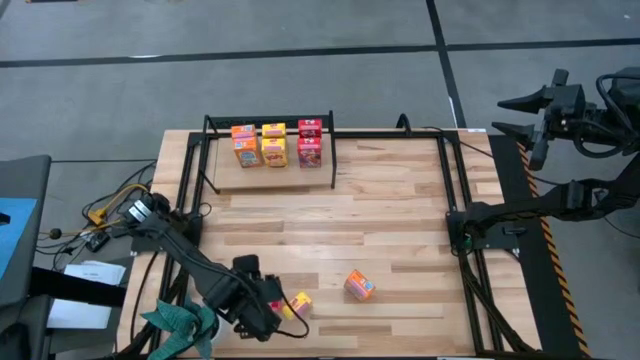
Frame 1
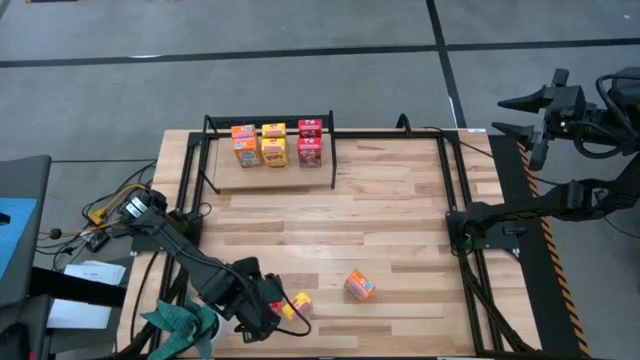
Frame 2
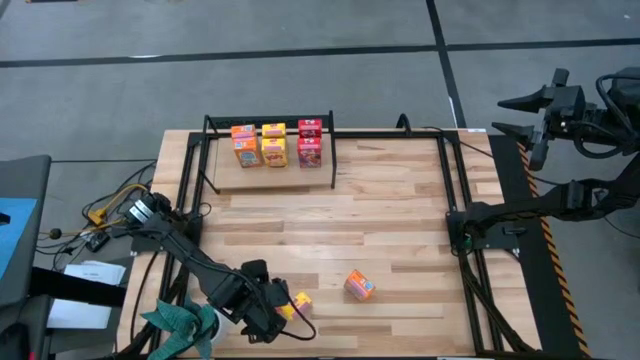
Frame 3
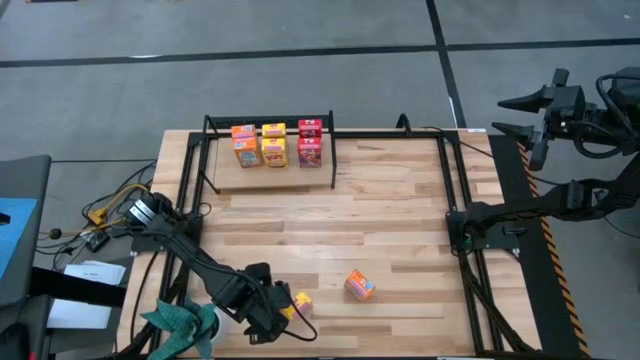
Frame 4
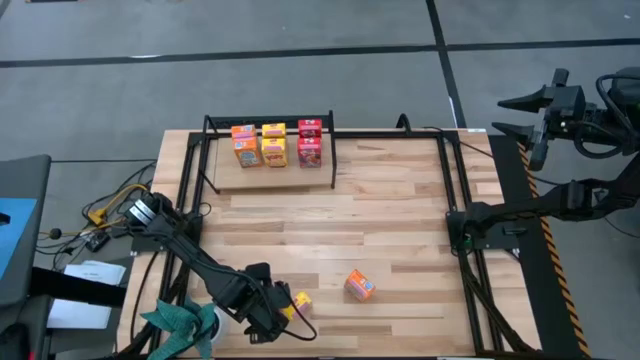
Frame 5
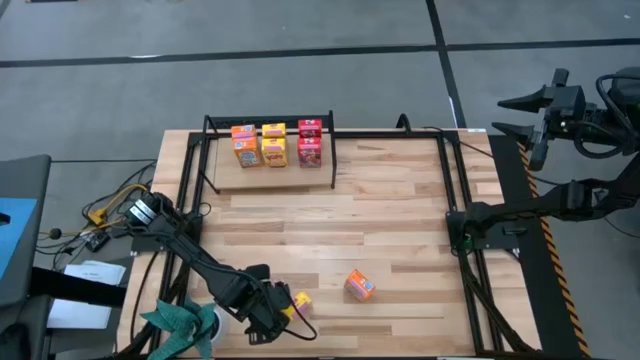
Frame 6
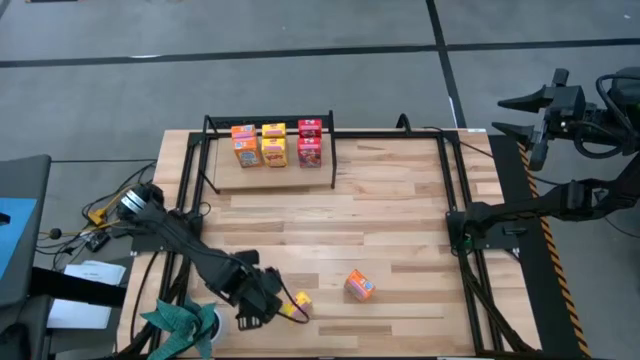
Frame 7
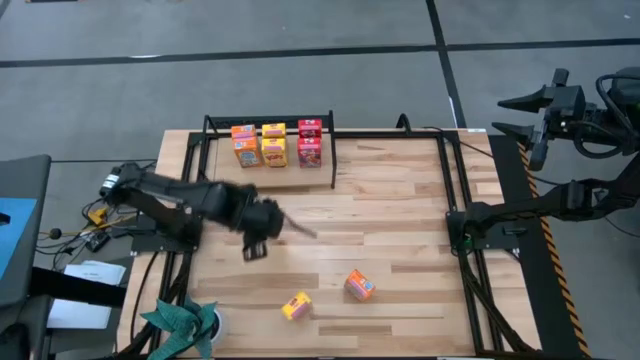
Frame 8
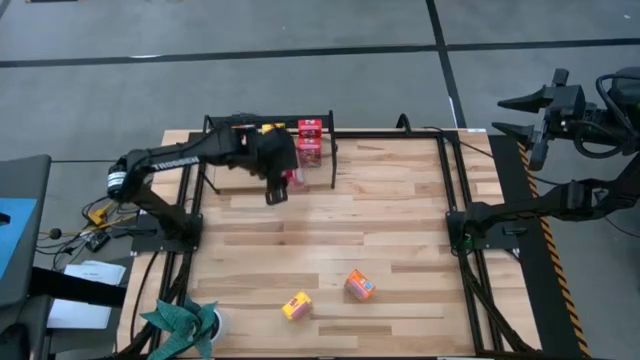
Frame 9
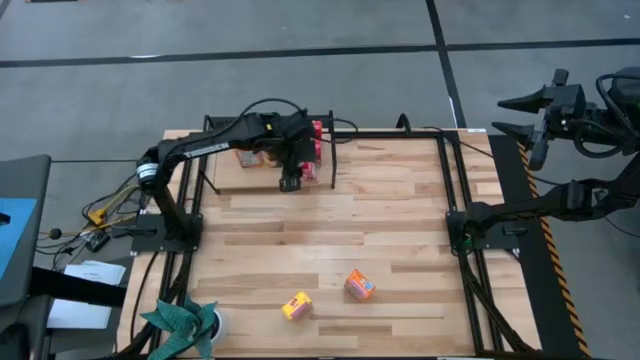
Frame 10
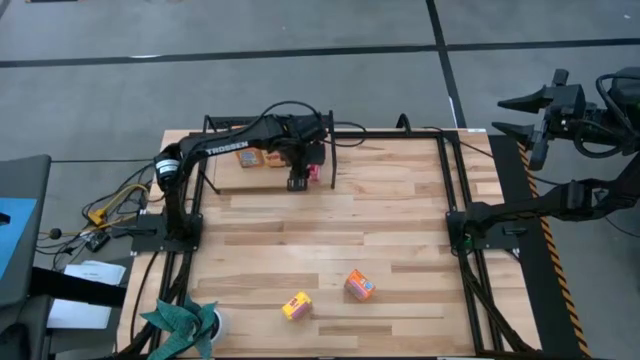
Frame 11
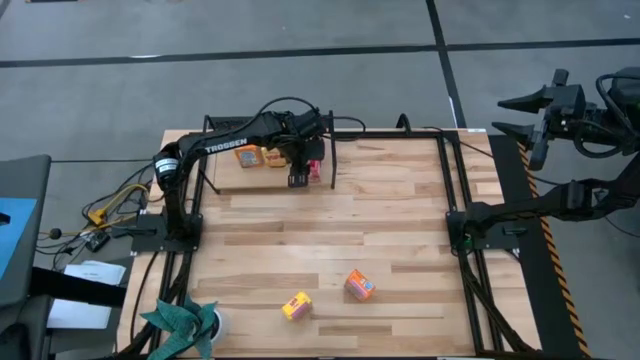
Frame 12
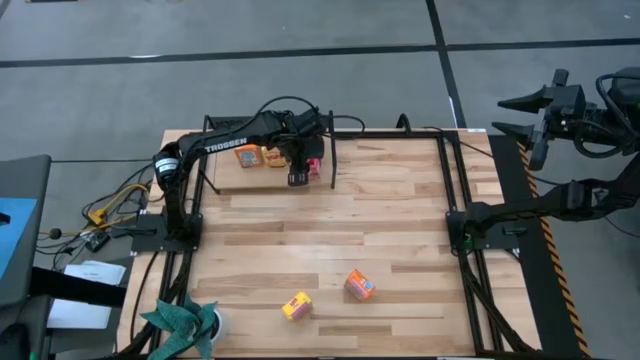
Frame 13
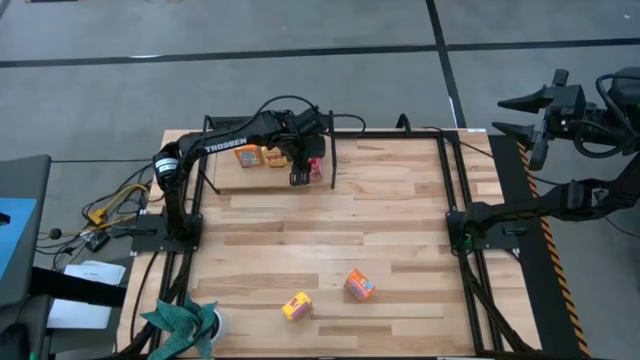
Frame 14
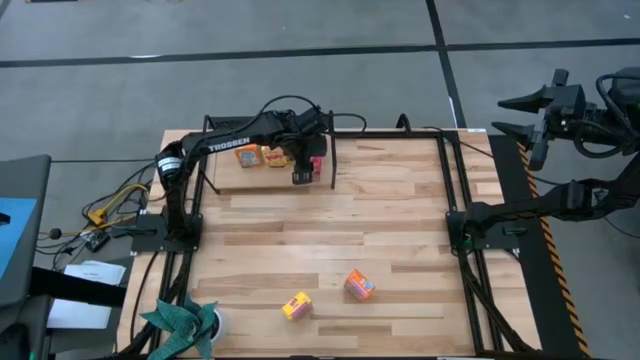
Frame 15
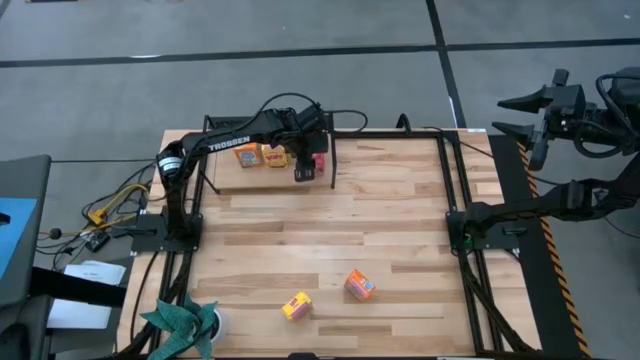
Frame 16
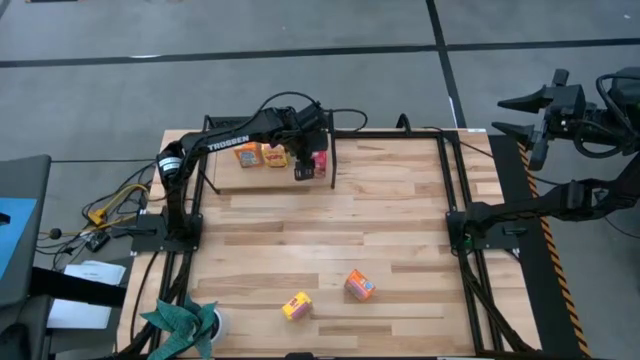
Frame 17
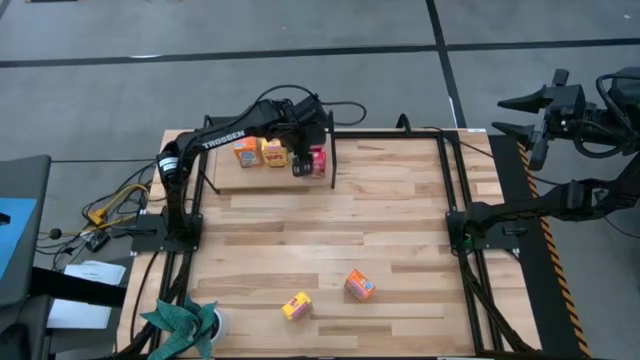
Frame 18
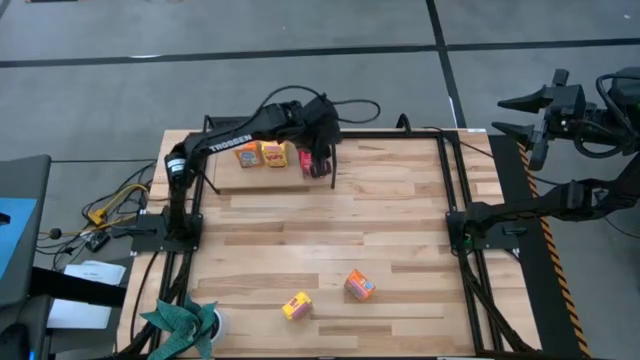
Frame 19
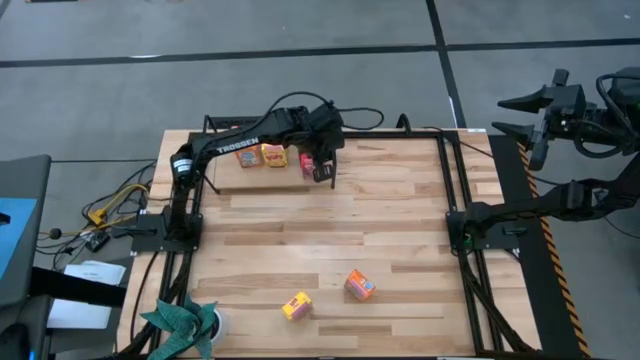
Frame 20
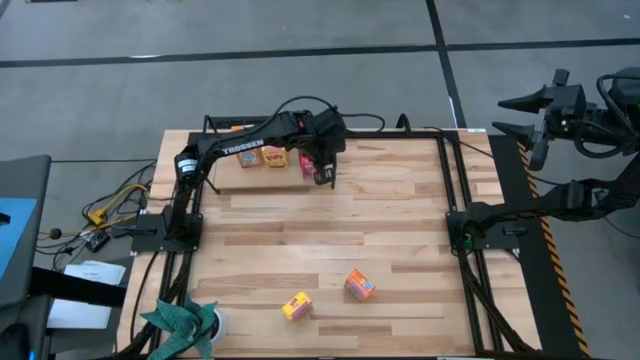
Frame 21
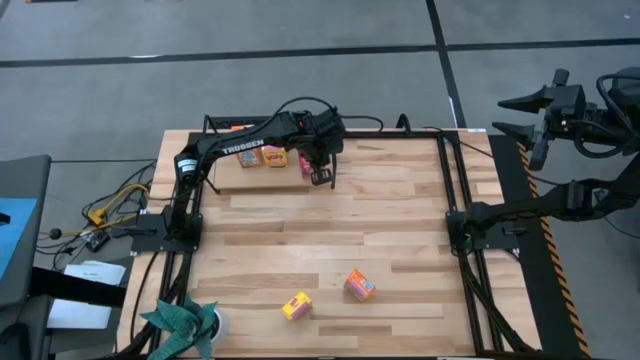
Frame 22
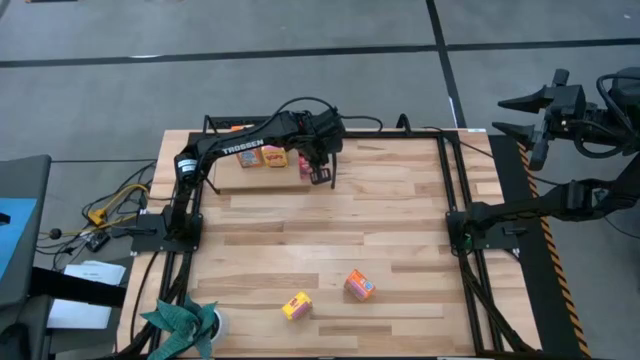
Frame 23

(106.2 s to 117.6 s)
Task: Stack cereal on shelf
Put the red cereal box on the shelf aligned with the other red cereal box

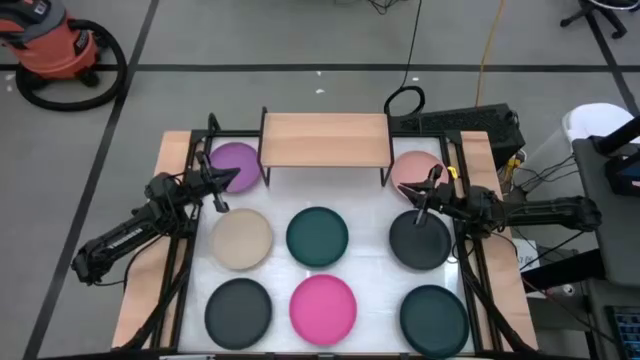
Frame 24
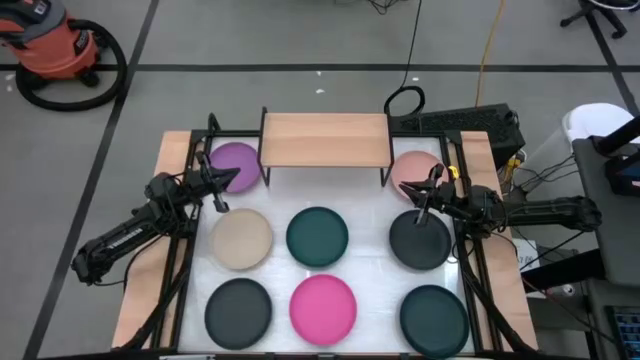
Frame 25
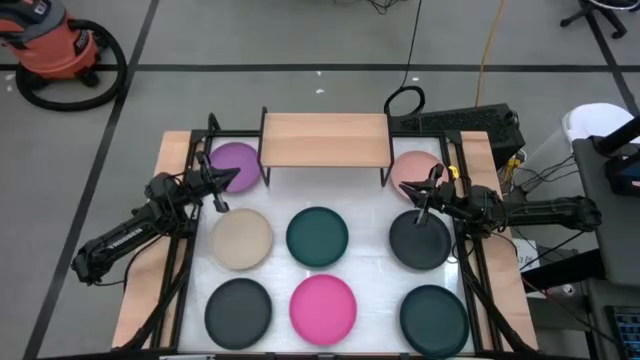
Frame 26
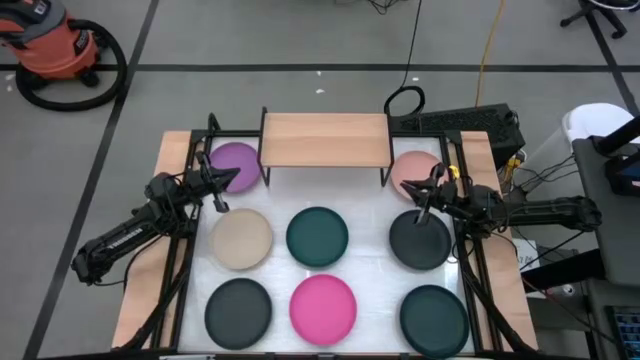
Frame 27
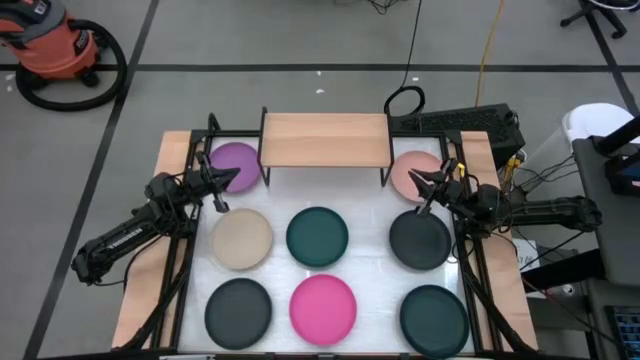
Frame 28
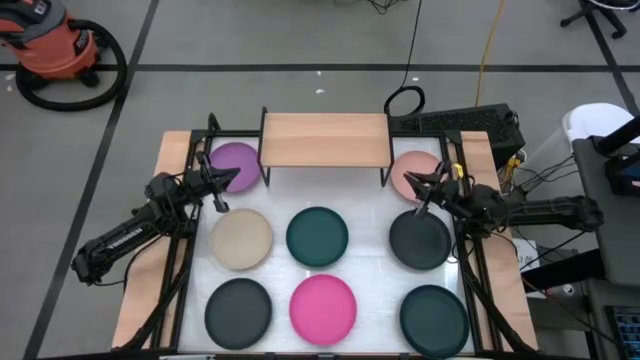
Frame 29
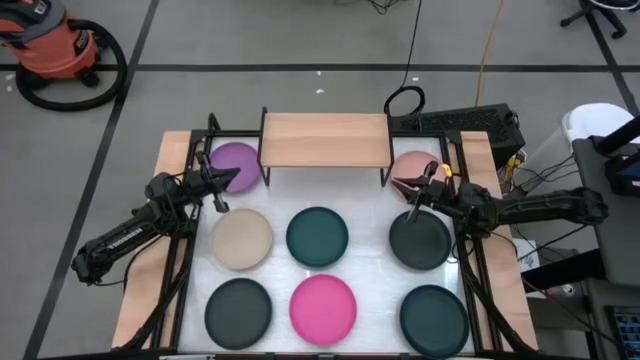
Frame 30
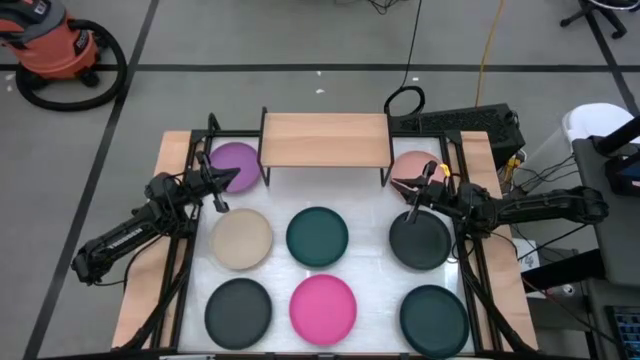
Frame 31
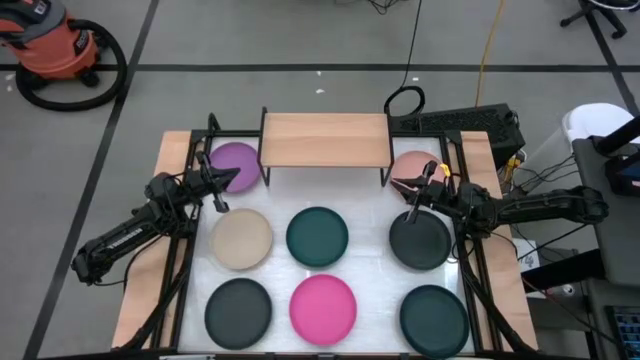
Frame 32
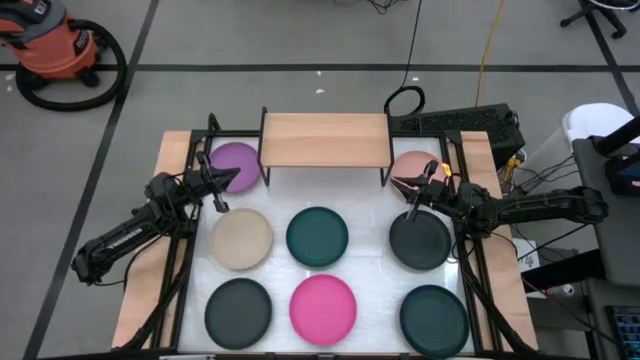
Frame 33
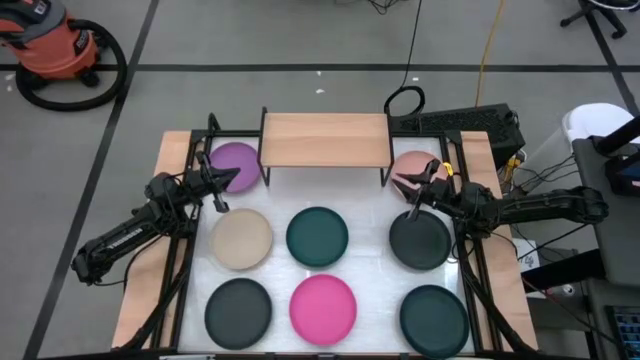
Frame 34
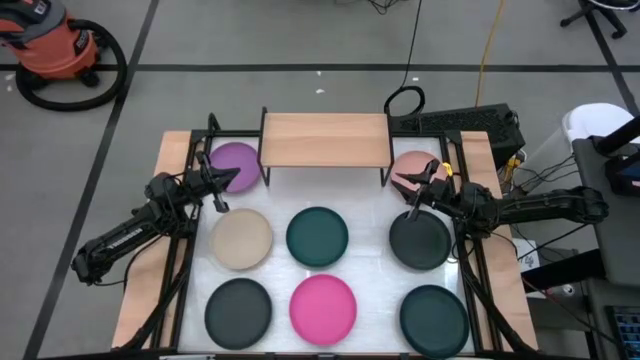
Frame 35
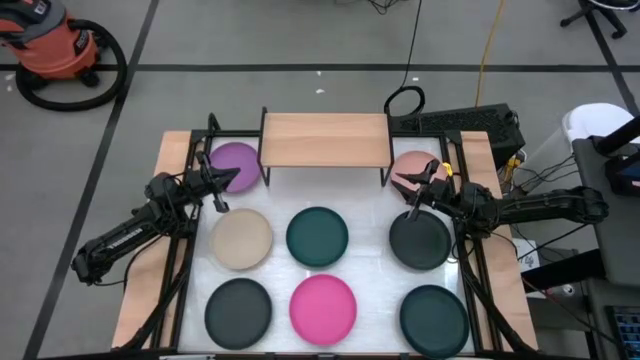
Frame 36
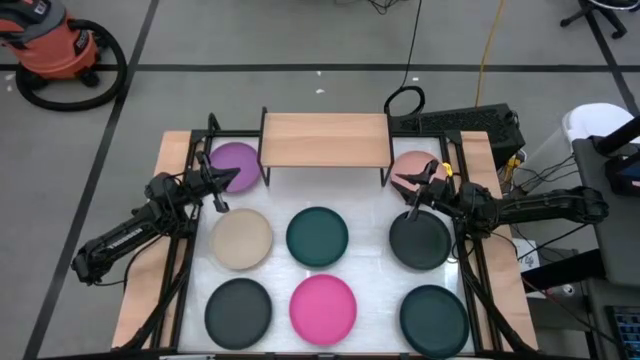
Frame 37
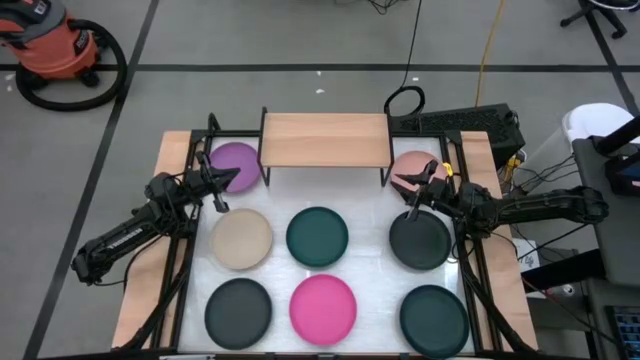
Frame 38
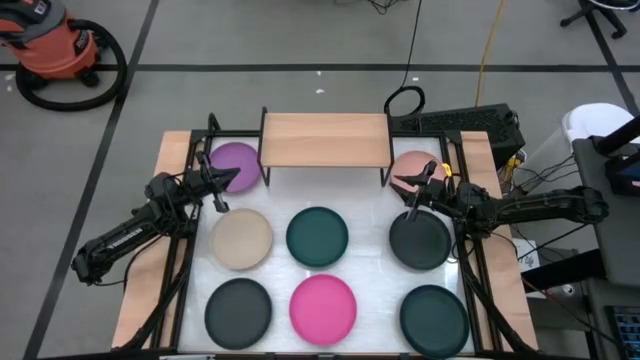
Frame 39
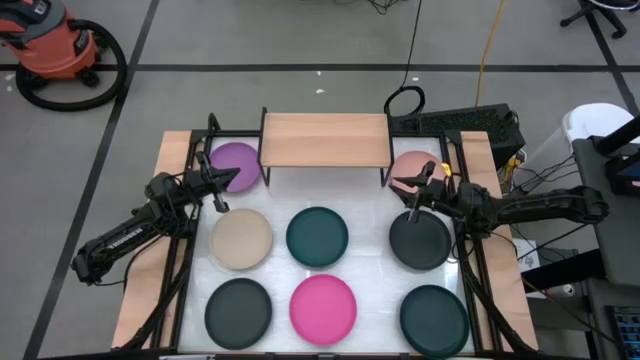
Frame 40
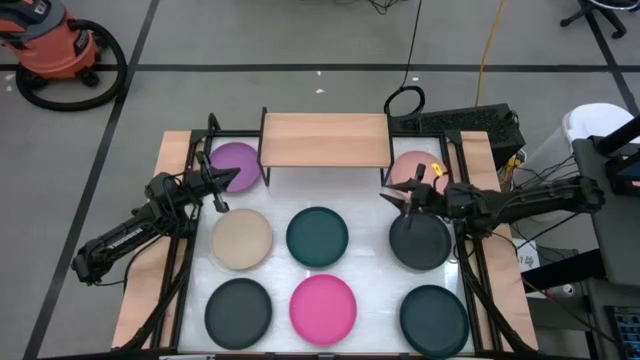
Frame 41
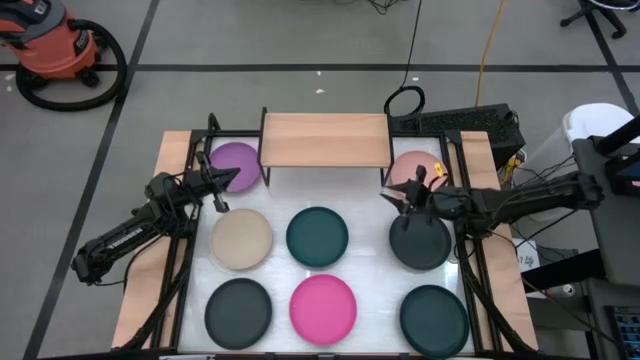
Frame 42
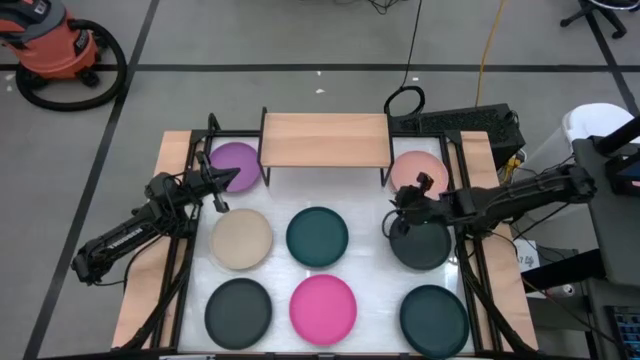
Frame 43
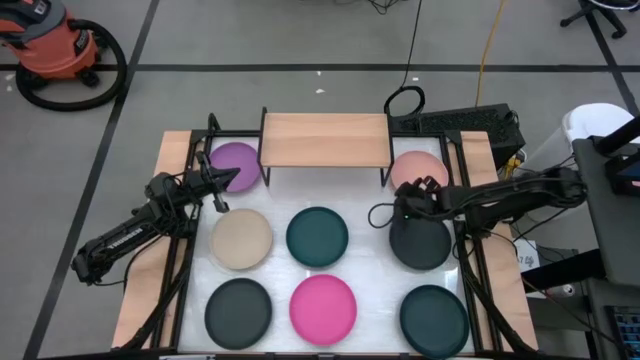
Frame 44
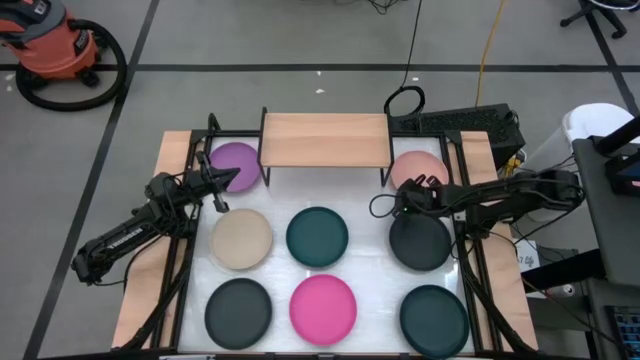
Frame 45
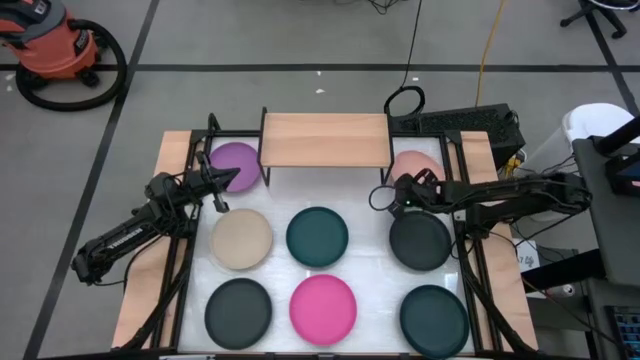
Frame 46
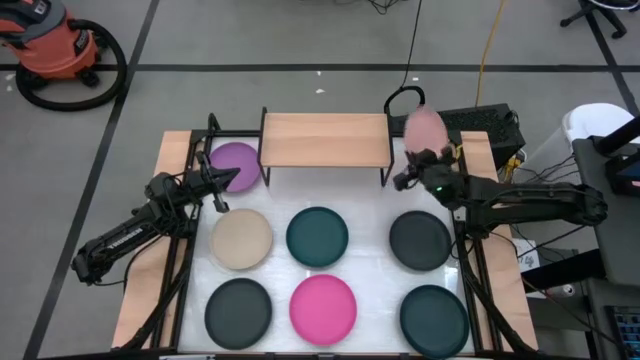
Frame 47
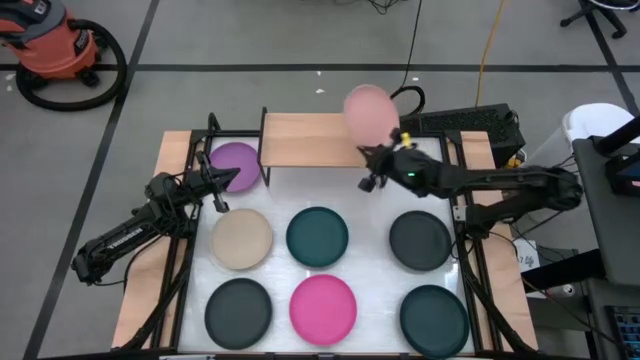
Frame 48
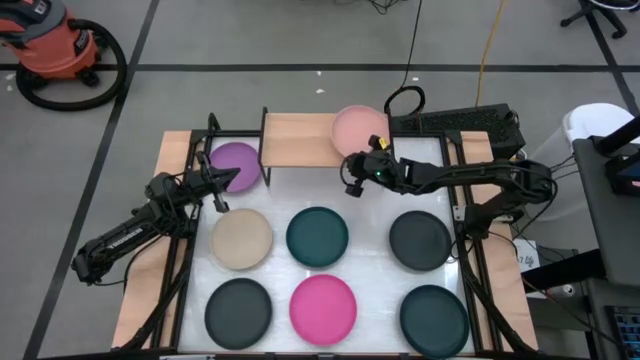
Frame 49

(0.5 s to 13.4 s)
Task: Place and stack plates onto a shelf
Put the light orange plate on the shelf
